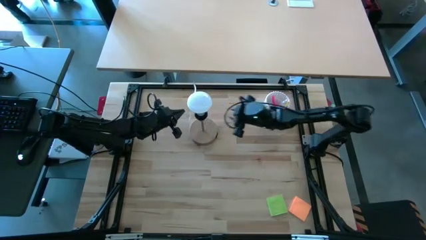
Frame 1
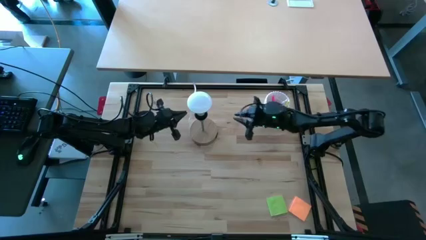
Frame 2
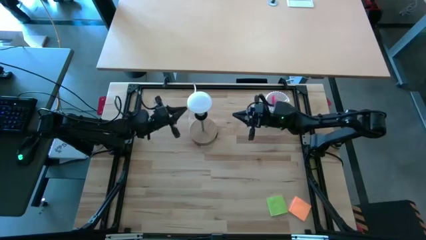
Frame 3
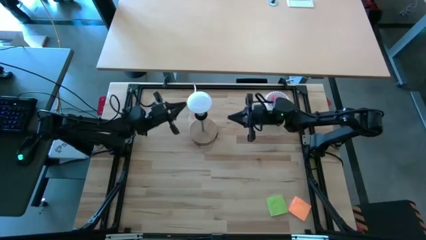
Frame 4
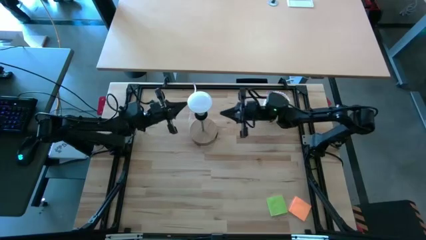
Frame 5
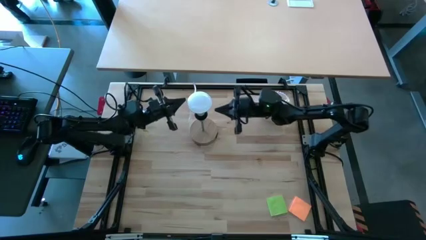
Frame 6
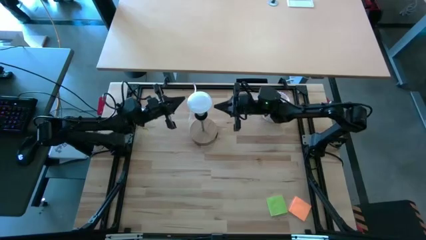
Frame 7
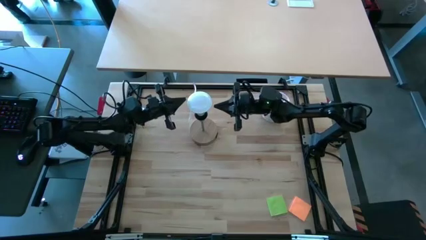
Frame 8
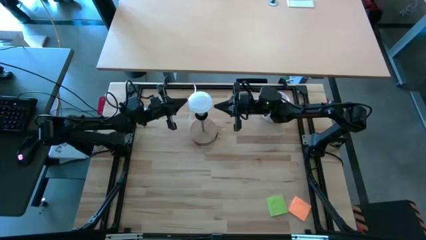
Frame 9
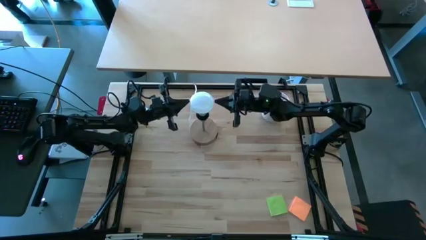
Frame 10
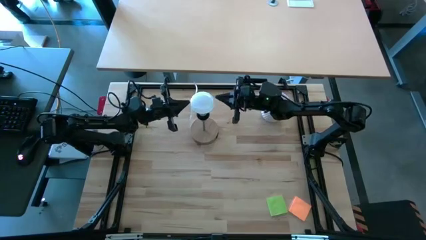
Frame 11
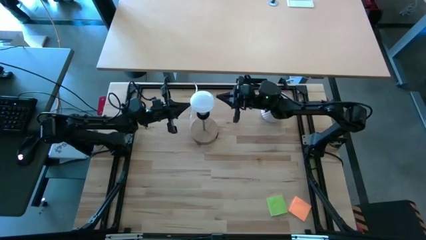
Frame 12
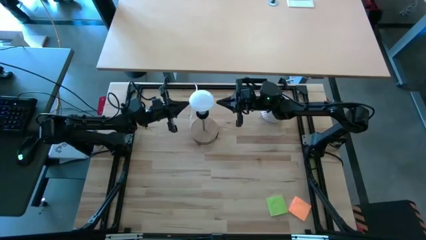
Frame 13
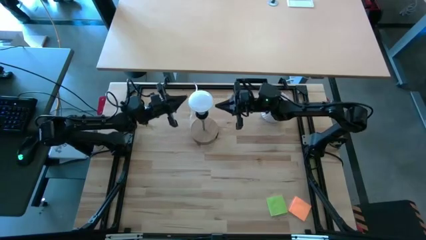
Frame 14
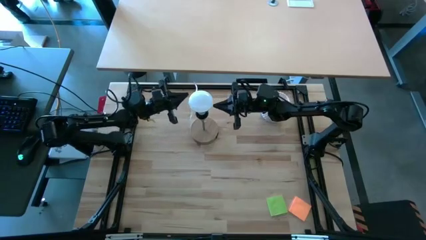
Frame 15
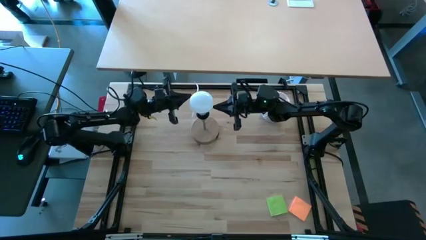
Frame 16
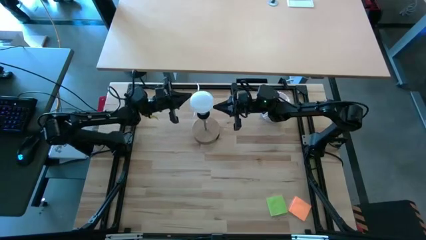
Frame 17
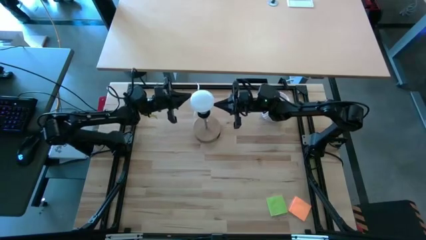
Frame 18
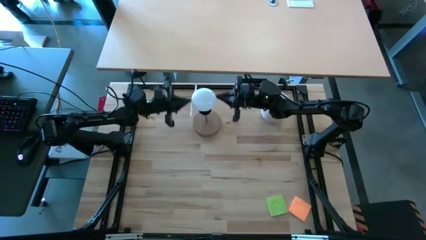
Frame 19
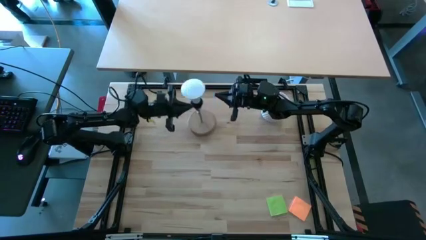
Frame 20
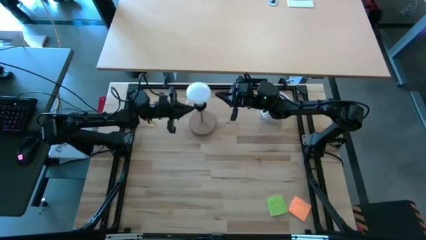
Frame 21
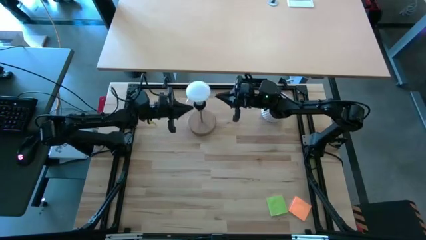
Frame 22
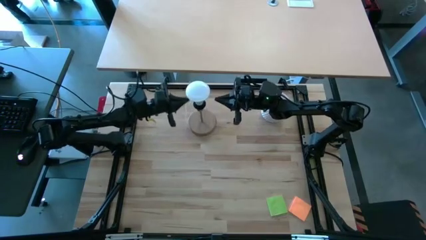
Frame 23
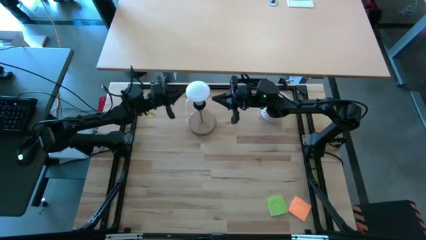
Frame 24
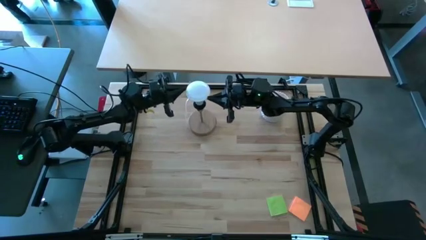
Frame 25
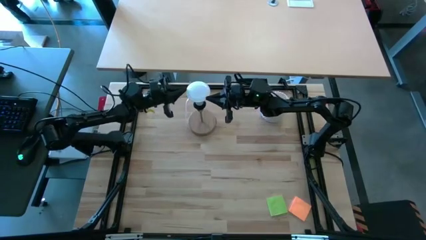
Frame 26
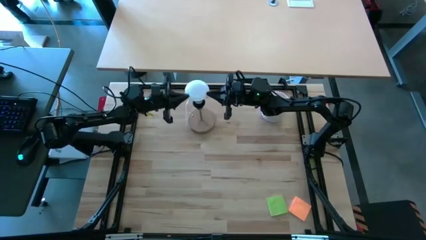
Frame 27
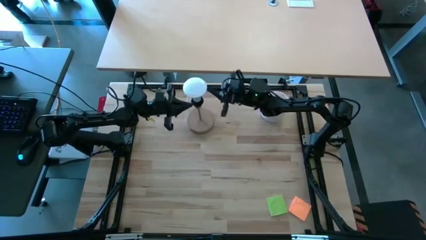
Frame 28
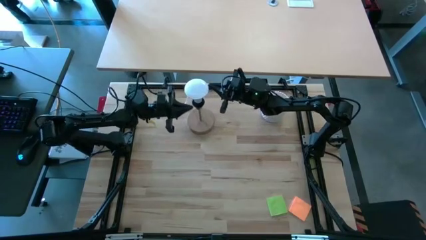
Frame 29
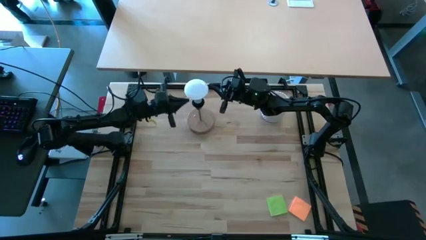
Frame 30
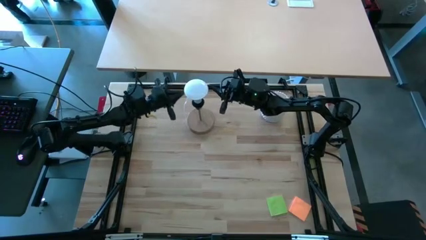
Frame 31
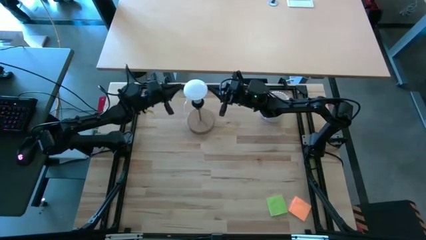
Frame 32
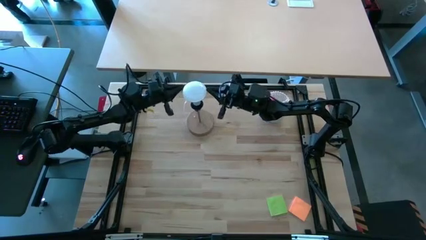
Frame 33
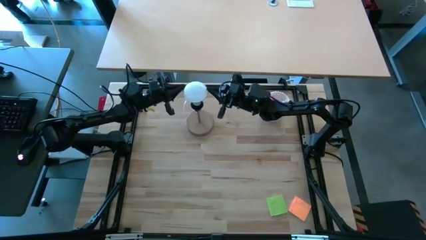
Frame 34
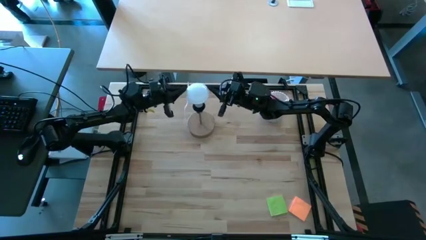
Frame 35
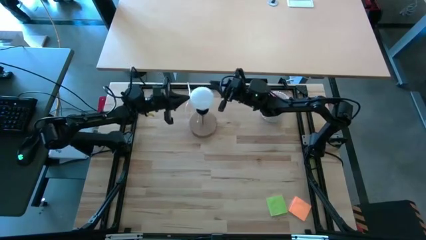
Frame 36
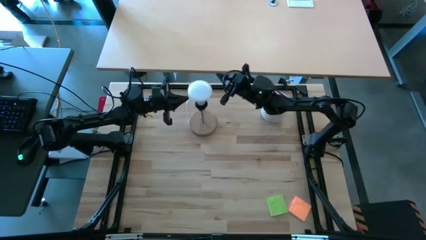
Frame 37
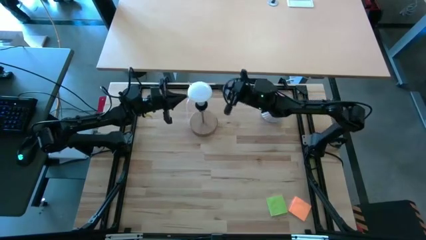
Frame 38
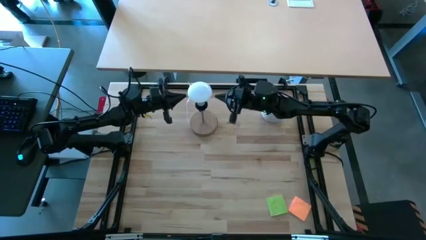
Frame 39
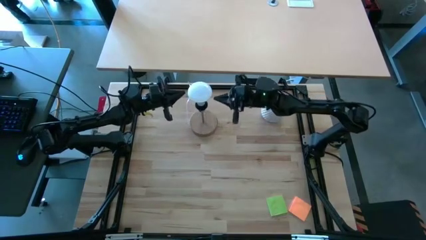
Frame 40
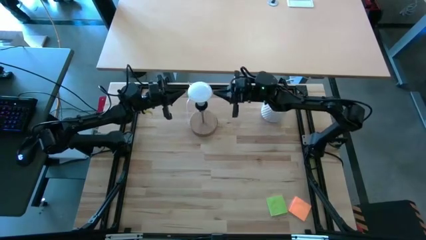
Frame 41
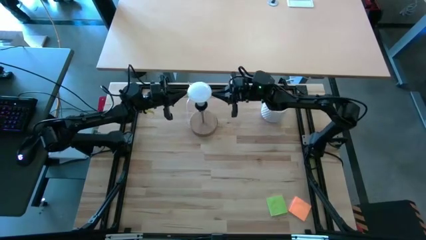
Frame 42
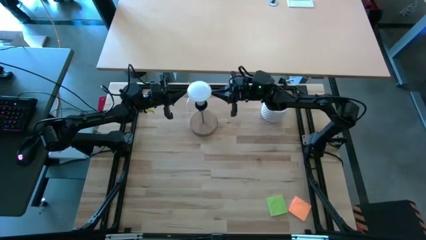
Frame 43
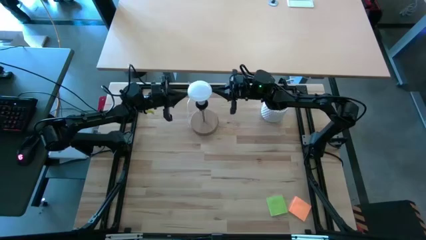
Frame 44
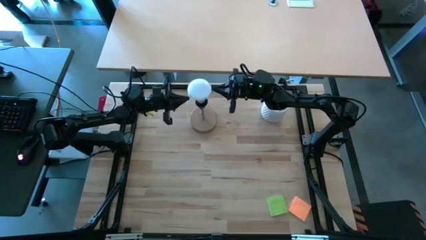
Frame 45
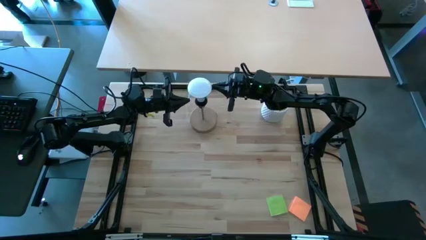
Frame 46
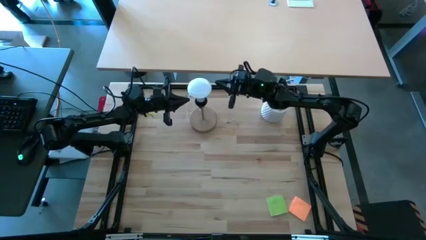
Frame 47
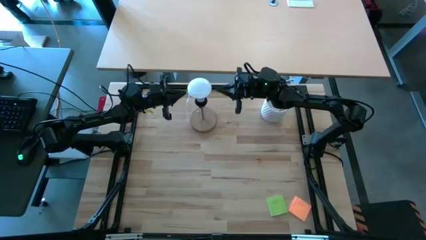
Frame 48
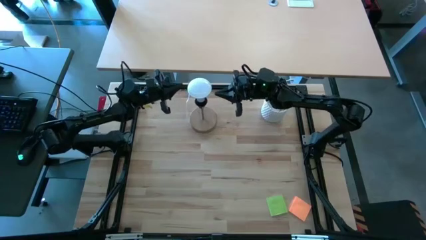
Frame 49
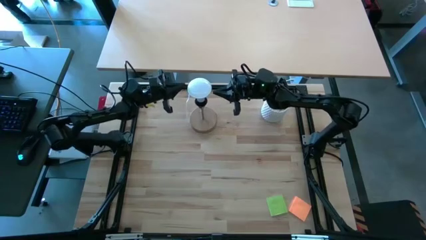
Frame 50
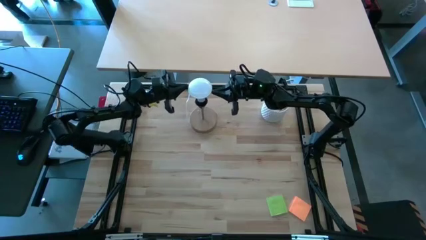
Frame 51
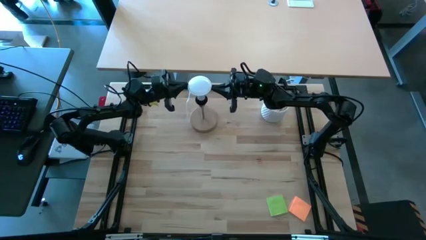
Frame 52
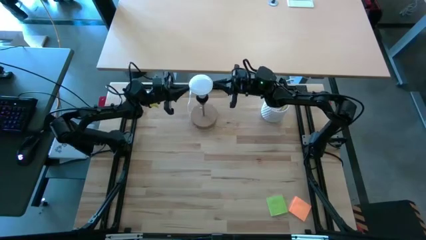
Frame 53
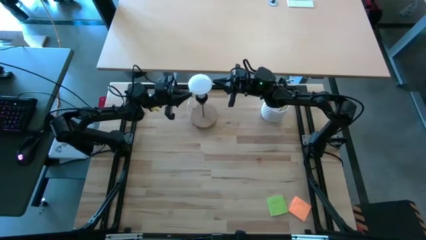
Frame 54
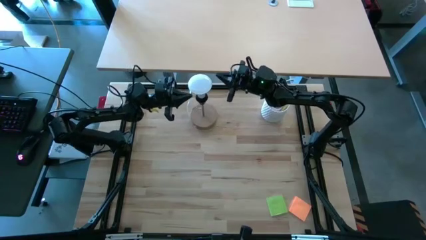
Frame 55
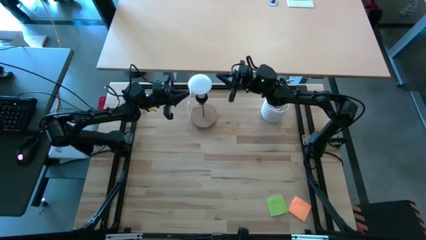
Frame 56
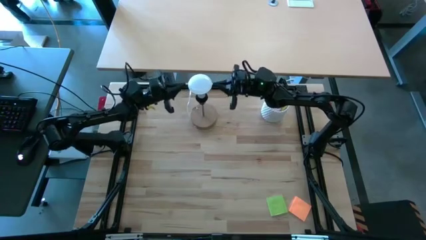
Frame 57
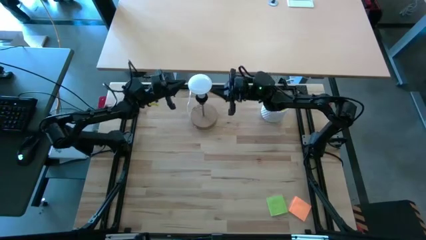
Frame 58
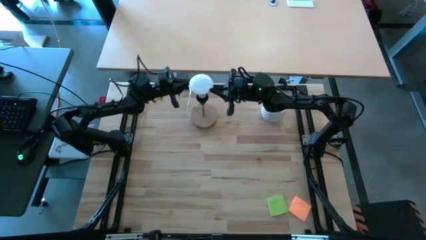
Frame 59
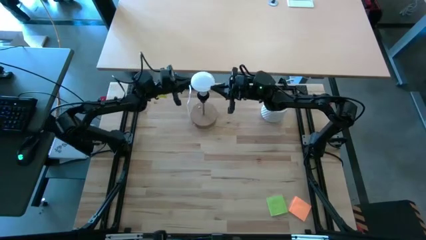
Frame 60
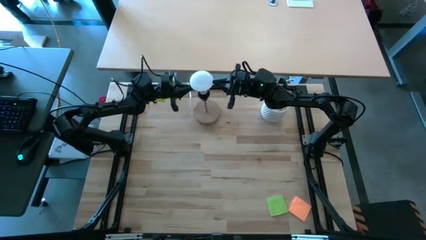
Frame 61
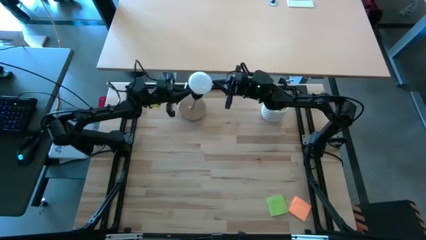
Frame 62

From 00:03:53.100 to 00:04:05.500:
Task: Screw lightbulb
Remove the lightbulb from the lamp

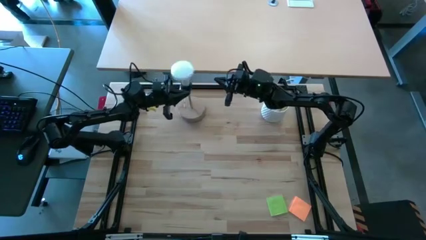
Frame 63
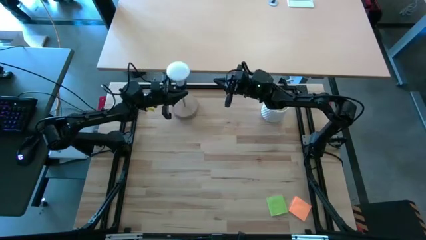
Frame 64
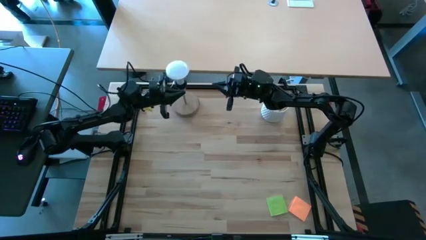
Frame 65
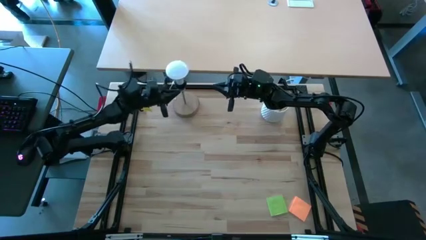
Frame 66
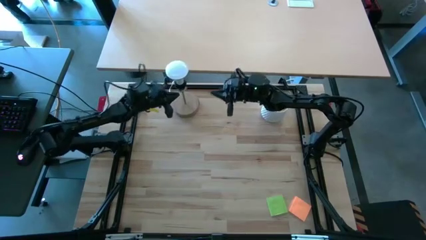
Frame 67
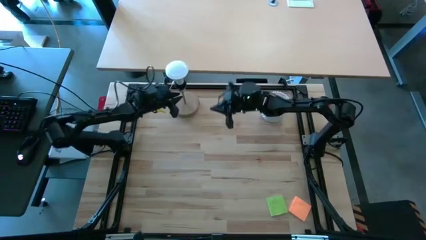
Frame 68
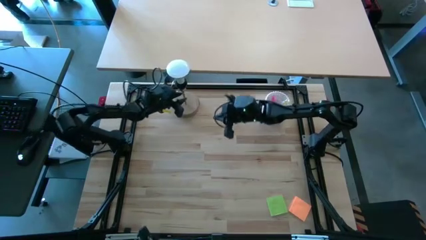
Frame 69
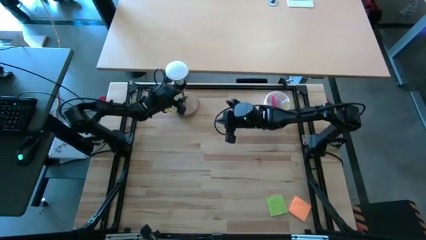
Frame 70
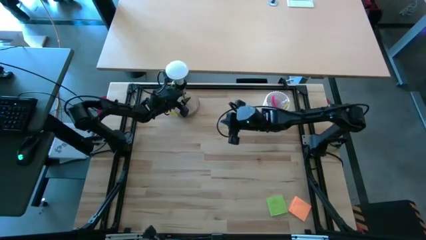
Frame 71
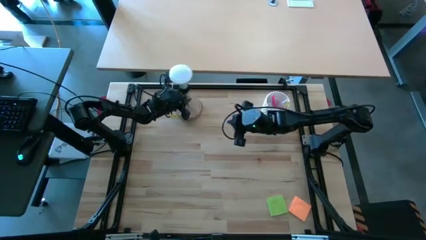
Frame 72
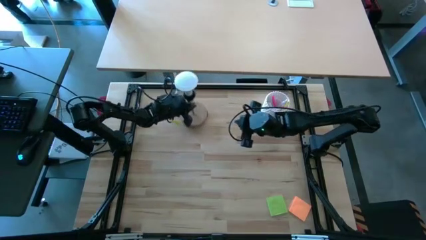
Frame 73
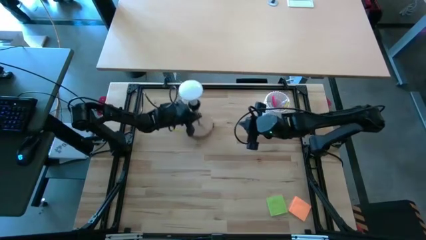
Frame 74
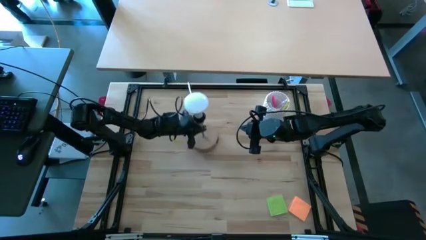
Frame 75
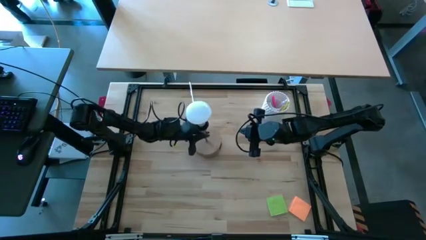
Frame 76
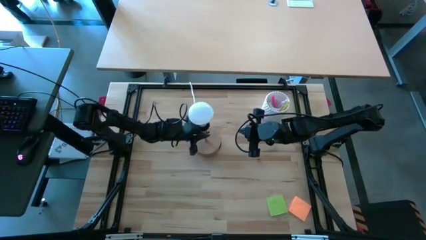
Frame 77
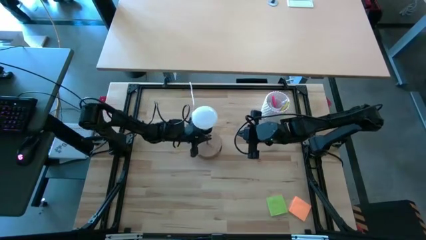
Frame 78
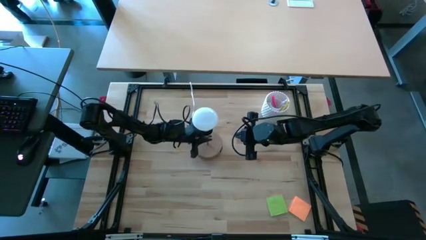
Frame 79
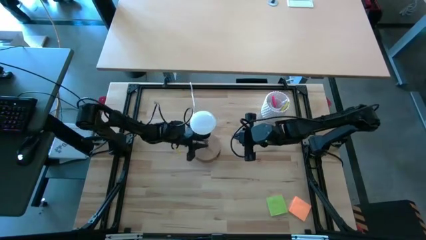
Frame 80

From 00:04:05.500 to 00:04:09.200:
Move the lamp to the center of the table

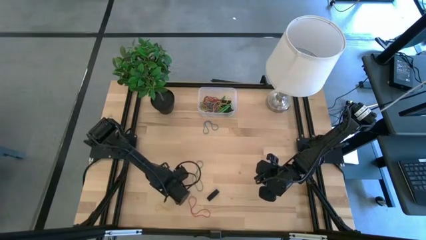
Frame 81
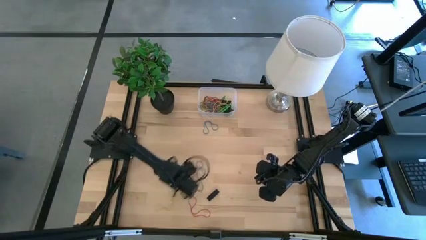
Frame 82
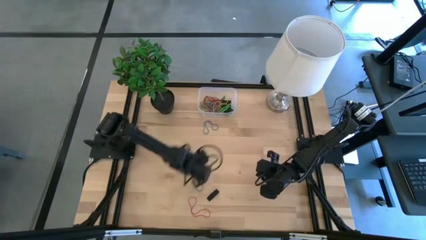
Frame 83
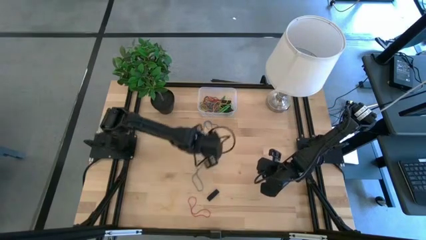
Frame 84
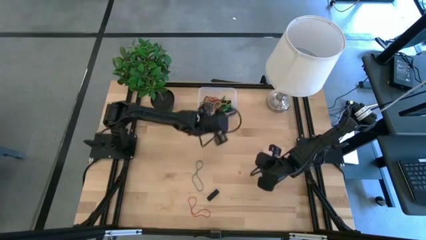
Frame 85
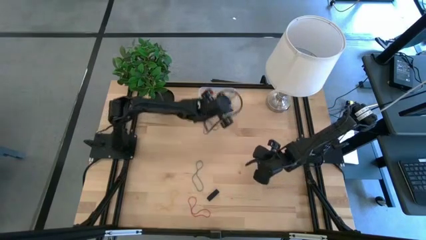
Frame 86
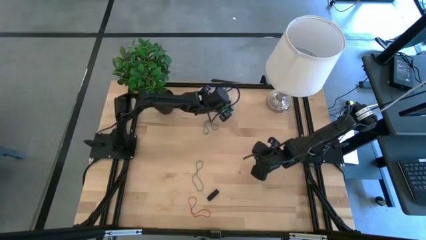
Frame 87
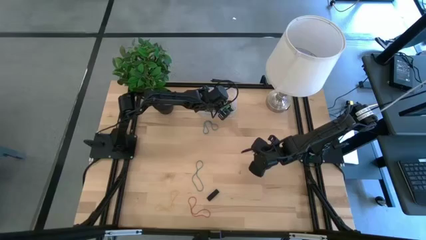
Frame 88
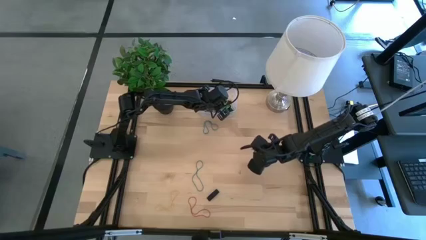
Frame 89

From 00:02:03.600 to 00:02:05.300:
Task: Pick and place rubber bands into bin
Put the green rubber band into the transparent bin
